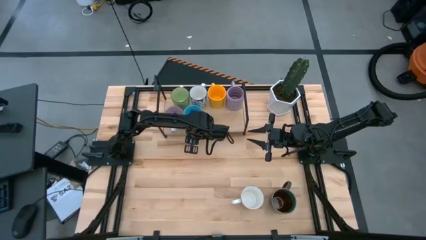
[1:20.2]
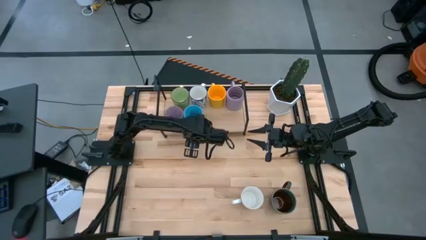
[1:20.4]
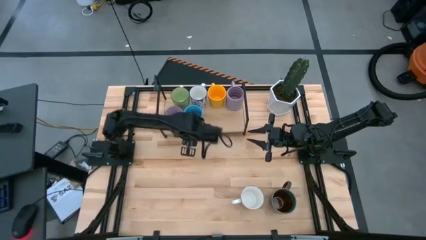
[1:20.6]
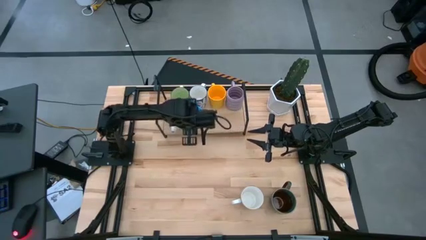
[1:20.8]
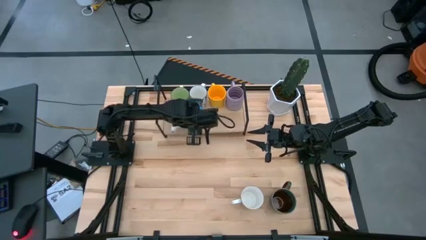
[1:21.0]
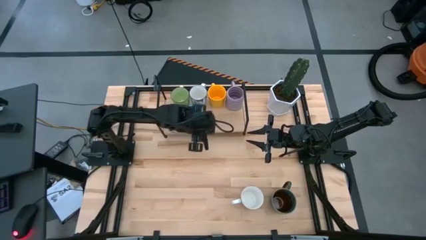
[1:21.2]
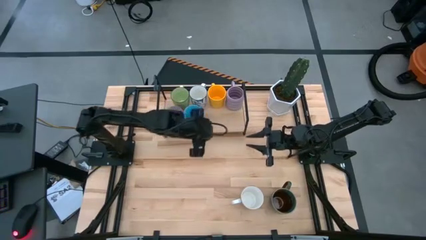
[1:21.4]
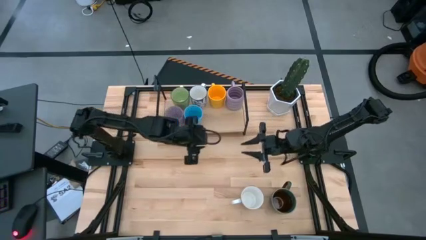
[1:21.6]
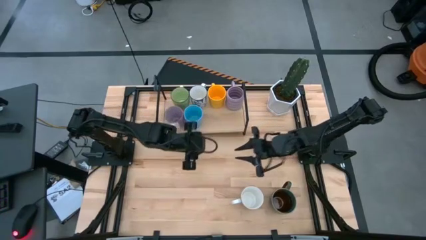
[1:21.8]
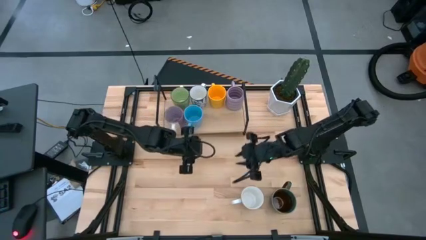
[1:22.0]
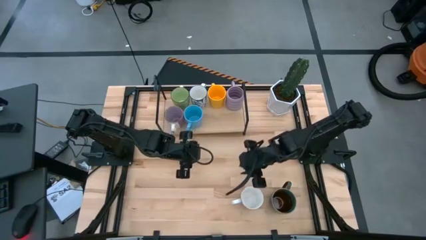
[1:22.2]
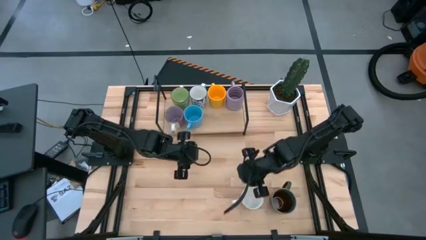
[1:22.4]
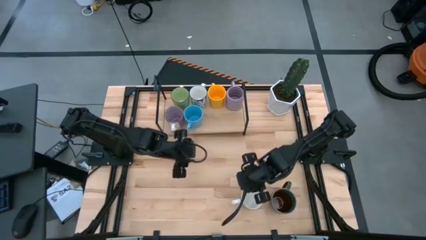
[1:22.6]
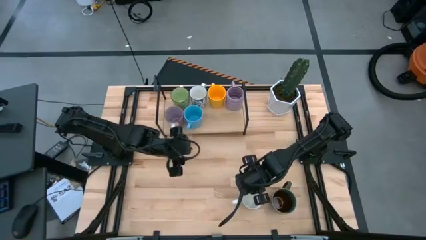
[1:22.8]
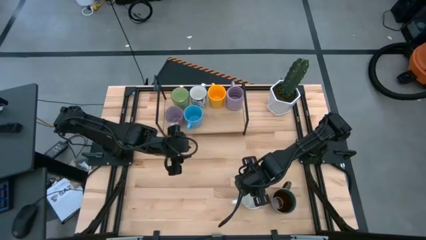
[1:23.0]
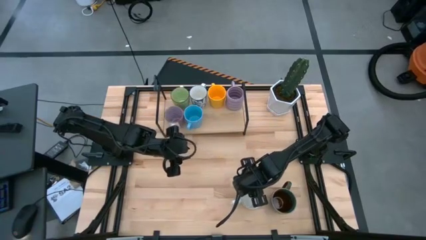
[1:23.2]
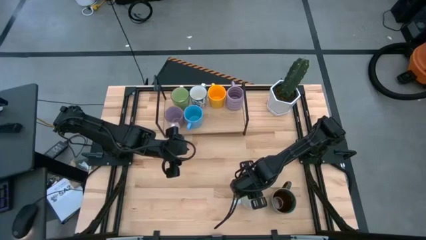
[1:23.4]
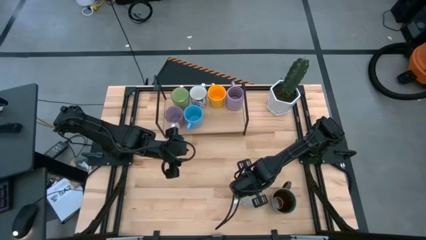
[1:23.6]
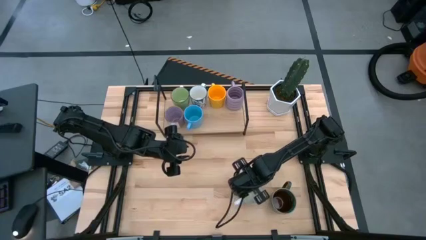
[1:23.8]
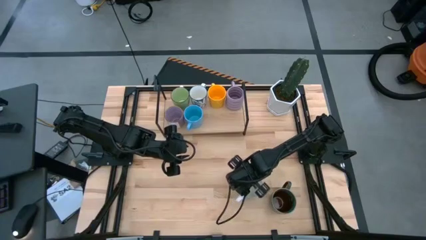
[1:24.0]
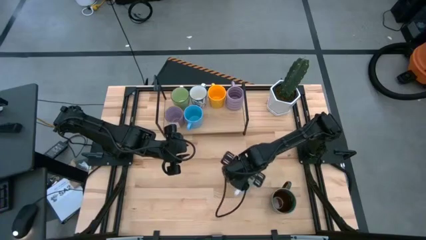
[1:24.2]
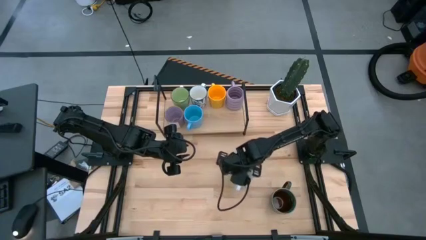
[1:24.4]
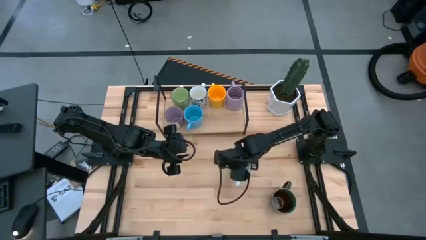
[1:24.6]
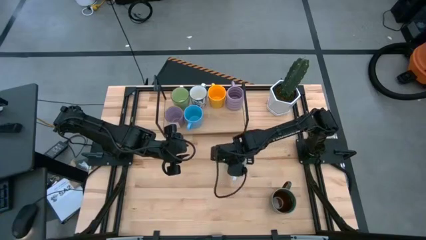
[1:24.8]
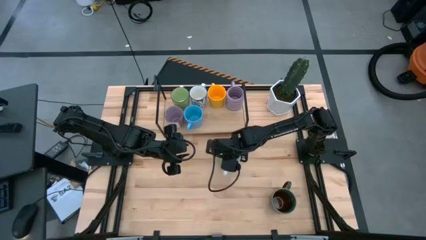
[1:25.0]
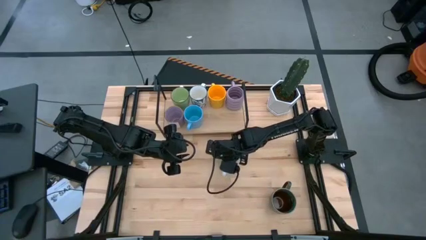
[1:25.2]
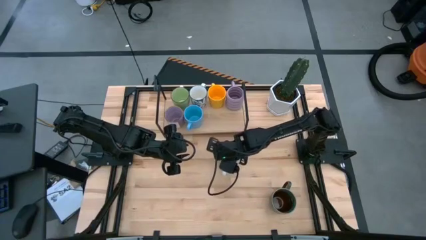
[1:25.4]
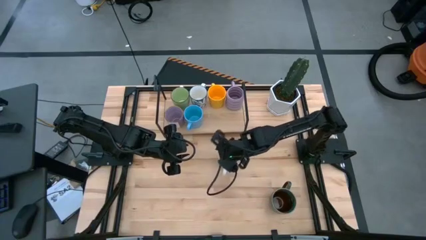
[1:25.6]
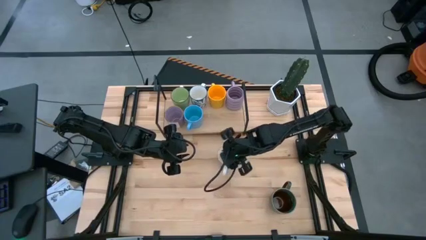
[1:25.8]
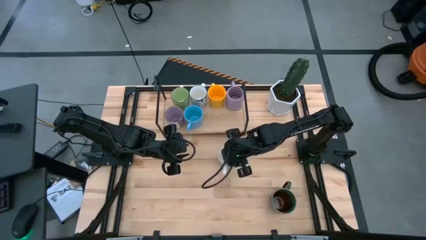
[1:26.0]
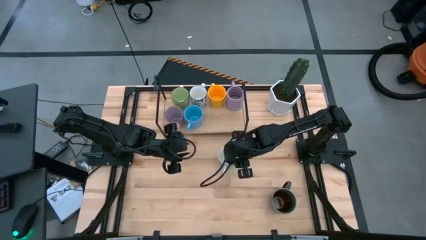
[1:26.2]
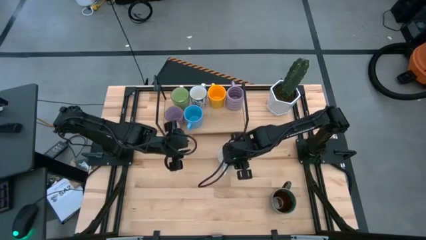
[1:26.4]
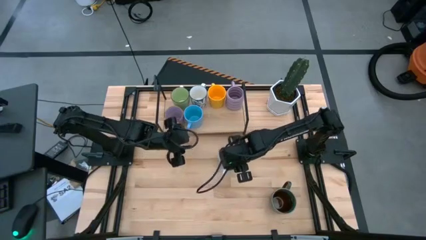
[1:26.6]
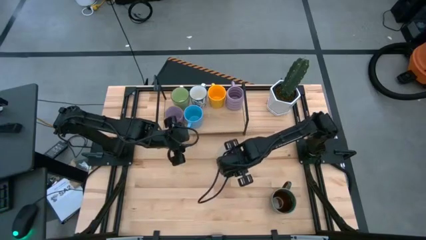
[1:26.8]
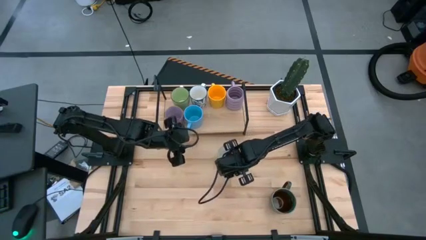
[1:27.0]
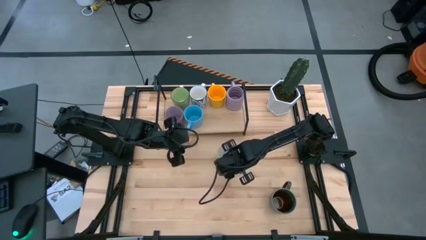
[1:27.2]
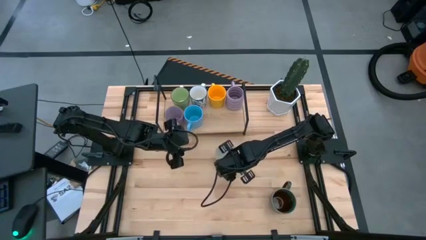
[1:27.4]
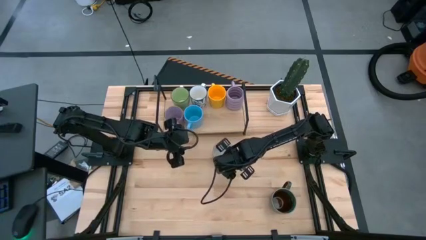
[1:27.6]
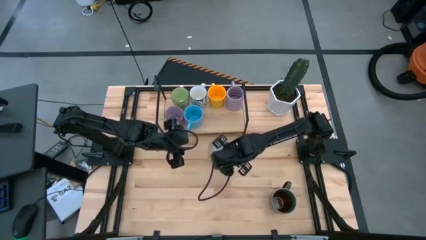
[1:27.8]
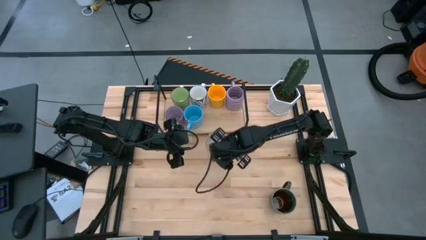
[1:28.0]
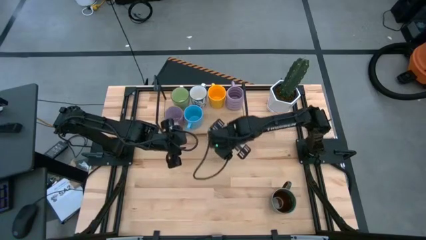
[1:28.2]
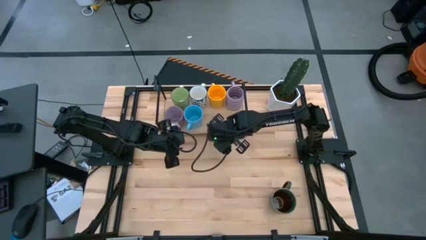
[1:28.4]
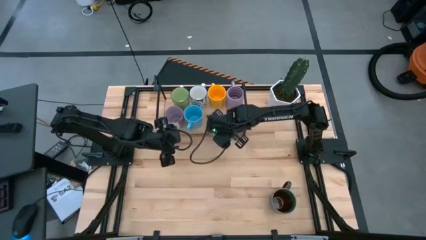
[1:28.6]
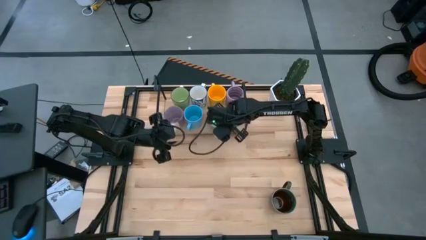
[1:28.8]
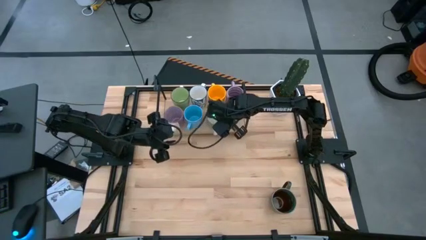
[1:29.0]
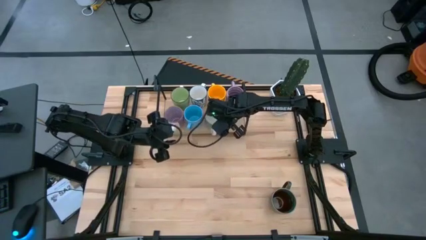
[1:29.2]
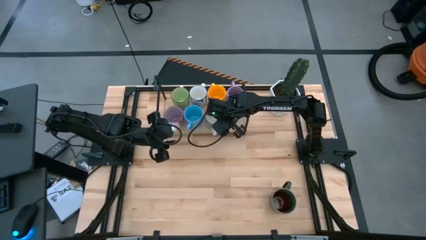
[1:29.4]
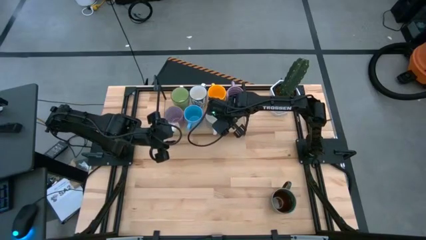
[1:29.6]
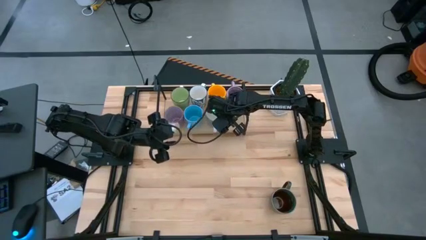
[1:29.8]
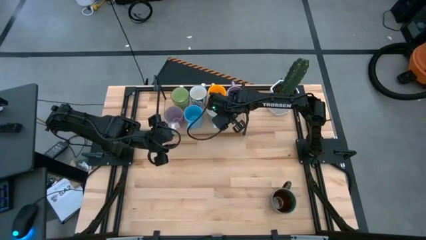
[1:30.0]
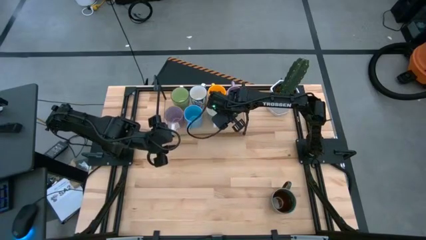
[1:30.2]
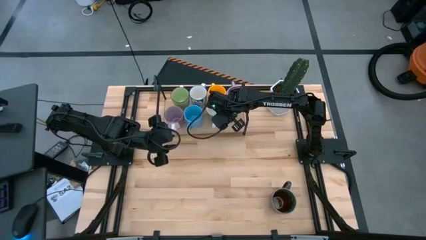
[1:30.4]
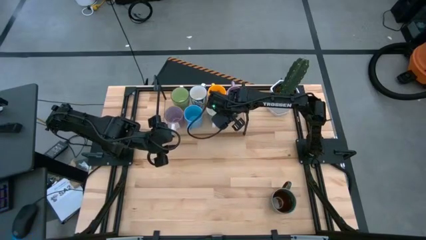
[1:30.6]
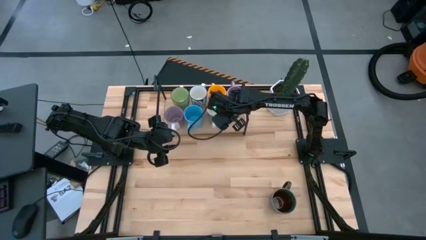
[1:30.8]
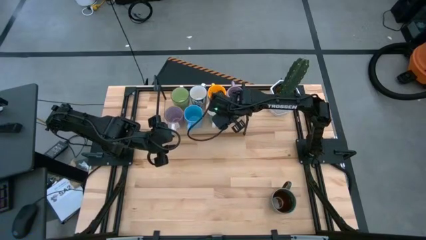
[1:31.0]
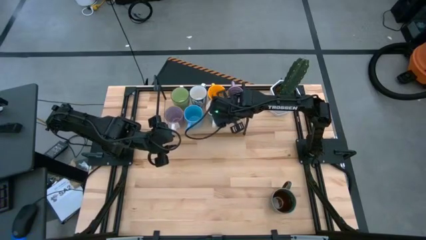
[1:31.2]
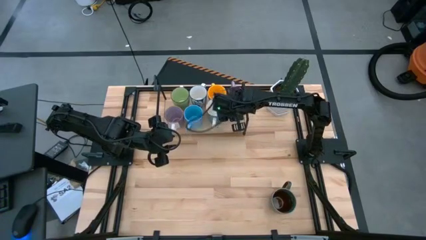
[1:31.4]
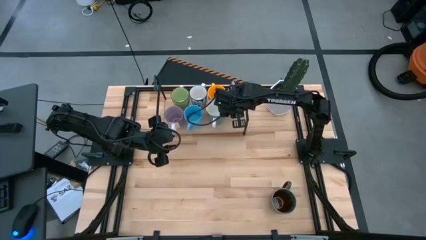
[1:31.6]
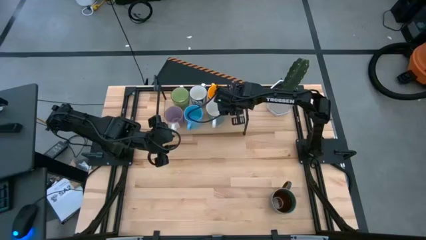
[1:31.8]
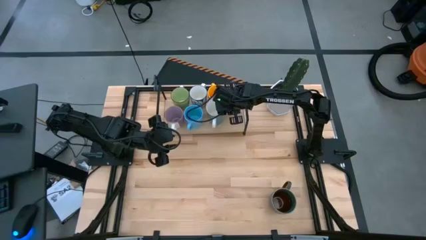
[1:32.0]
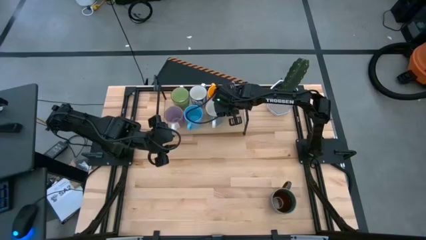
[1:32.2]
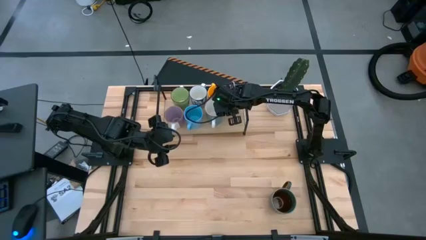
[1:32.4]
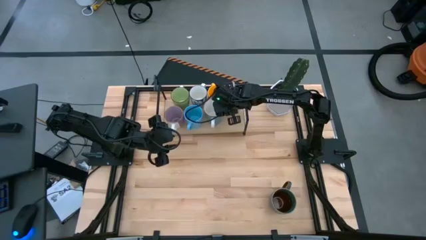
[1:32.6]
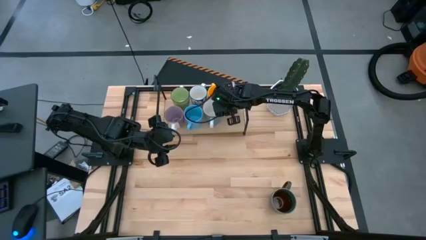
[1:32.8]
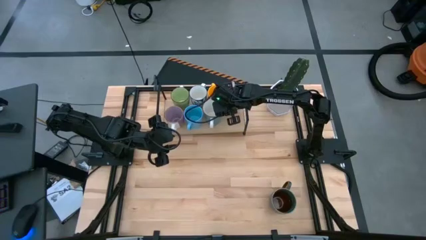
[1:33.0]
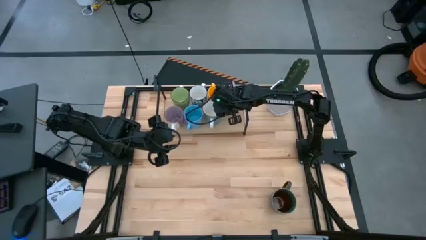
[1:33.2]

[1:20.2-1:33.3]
Task: Place coffee mugs
Put the dark green mug on the shelf aligned with the yellow mug

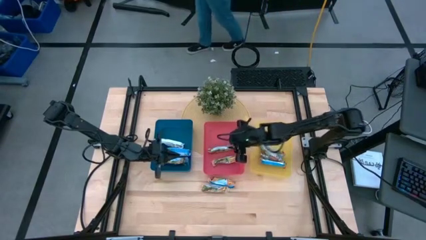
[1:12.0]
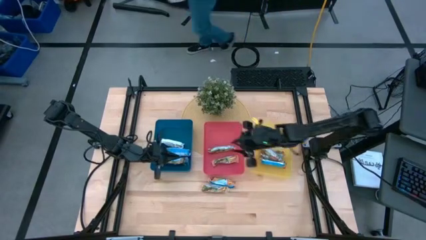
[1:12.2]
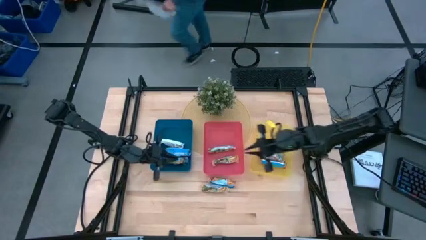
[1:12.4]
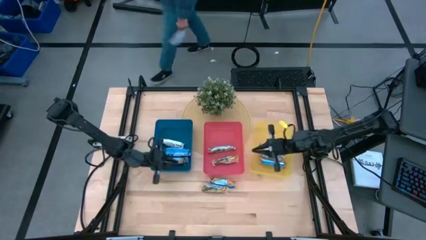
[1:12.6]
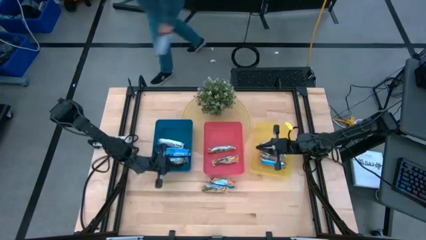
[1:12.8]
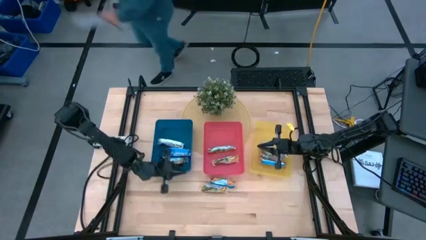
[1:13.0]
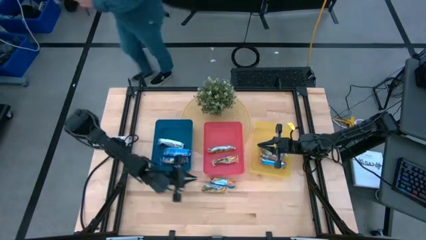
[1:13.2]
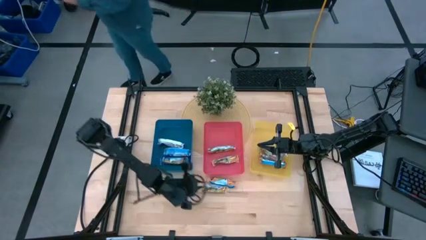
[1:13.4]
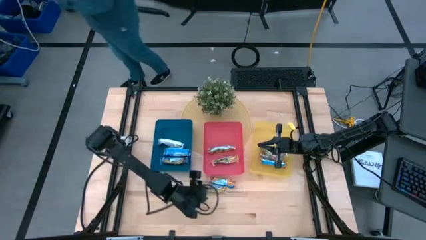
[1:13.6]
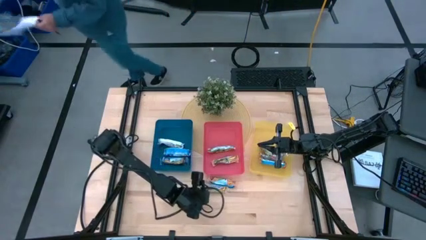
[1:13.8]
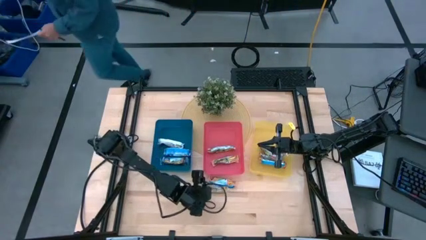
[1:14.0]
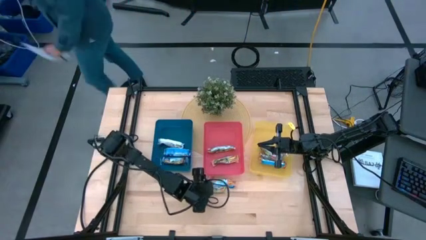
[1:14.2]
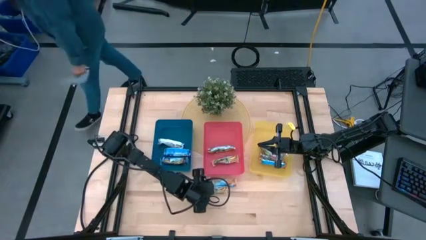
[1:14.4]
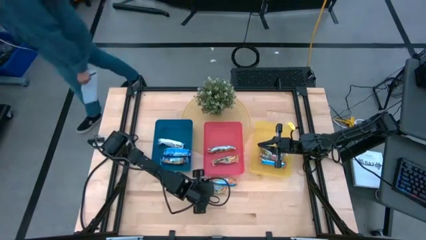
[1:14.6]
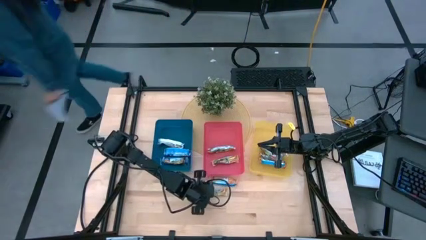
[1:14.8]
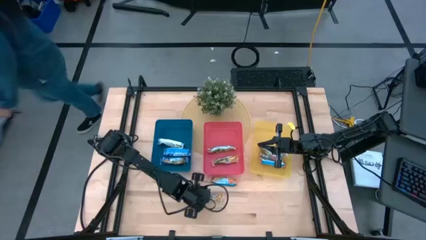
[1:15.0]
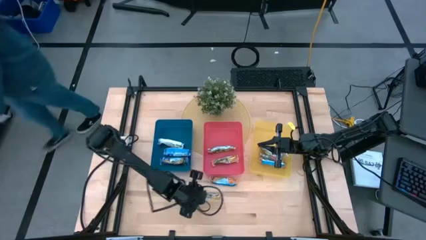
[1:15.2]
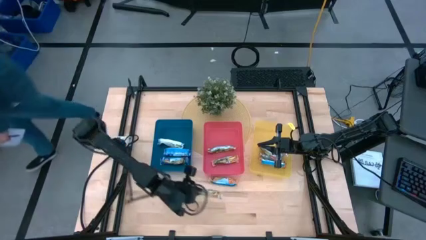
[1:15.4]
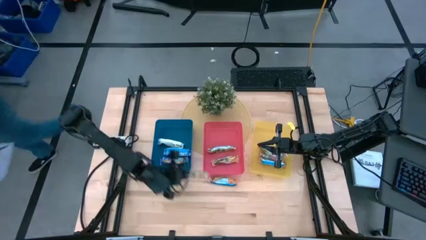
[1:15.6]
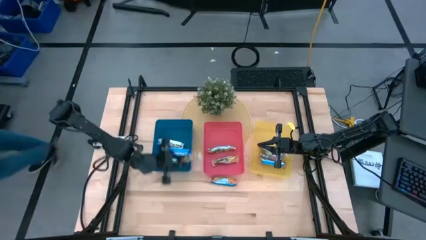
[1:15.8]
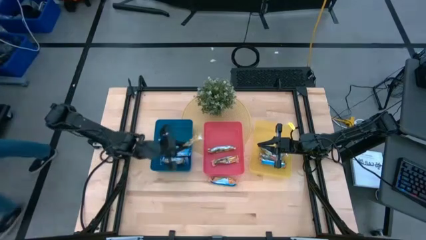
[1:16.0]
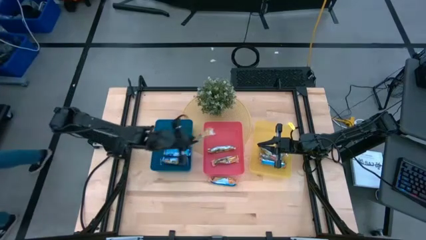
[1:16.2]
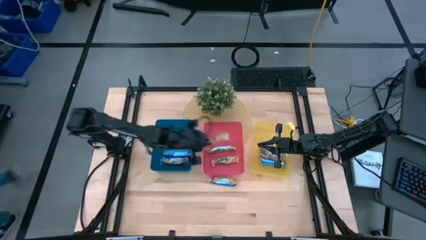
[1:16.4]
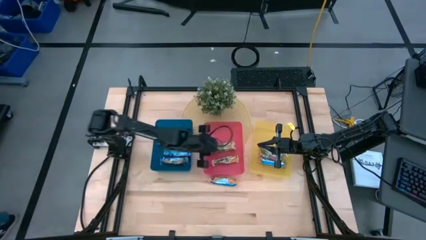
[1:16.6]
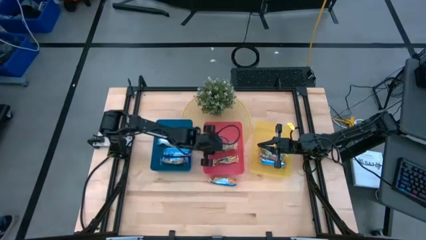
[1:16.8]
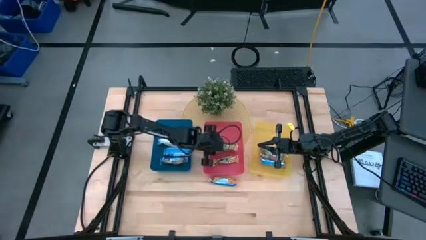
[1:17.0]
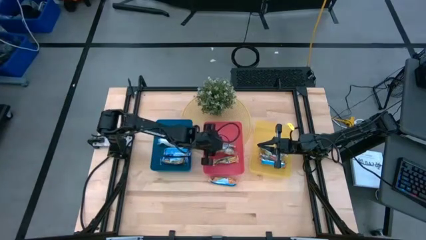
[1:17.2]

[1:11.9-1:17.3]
Task: Pick and place Granola Bars by type
Put the bottom yellow granola bar into the red bin
